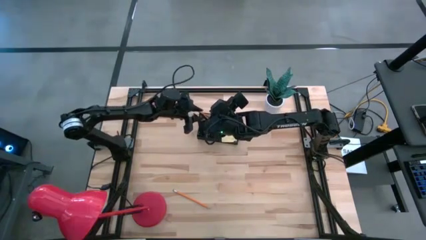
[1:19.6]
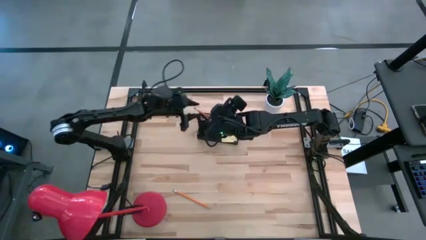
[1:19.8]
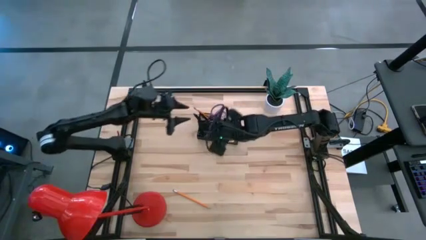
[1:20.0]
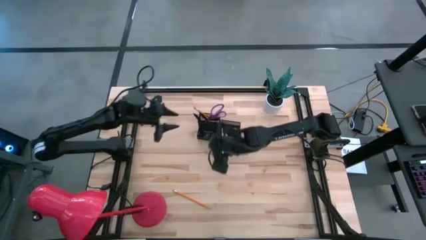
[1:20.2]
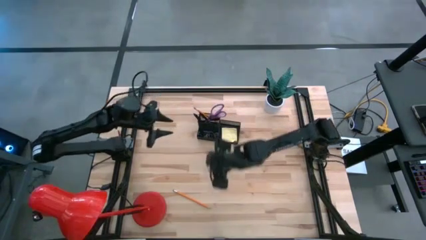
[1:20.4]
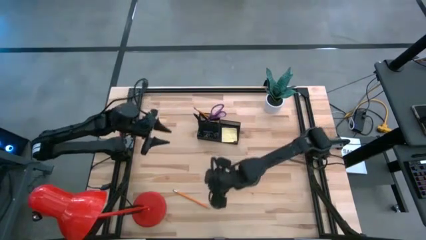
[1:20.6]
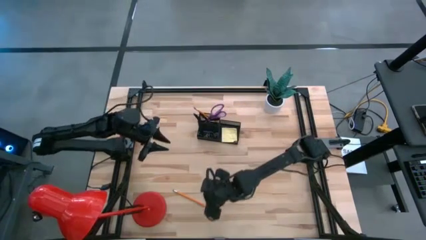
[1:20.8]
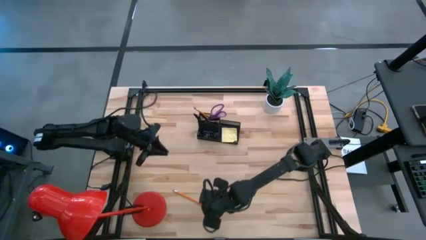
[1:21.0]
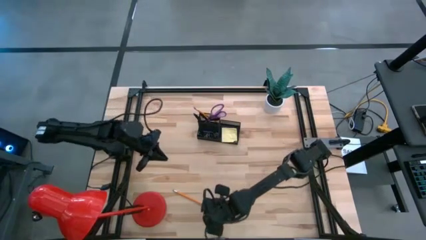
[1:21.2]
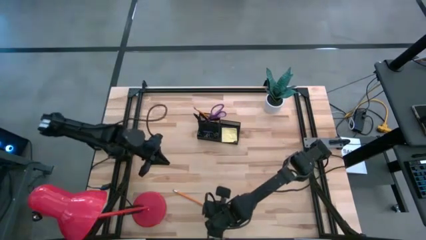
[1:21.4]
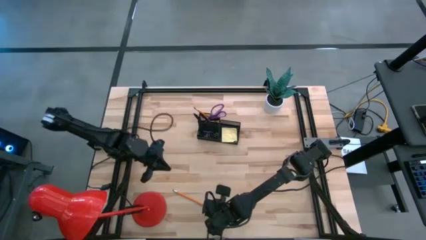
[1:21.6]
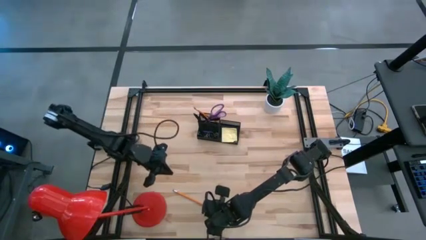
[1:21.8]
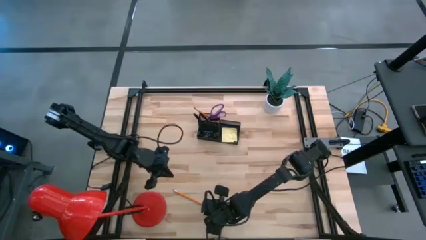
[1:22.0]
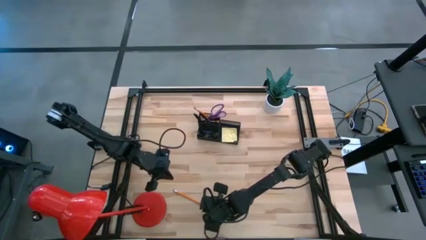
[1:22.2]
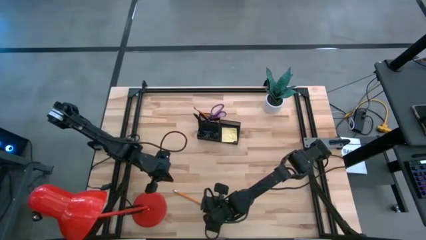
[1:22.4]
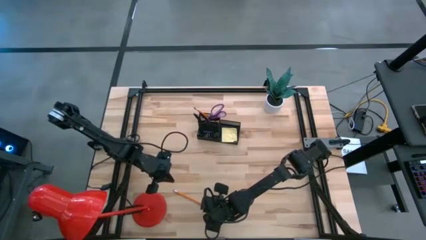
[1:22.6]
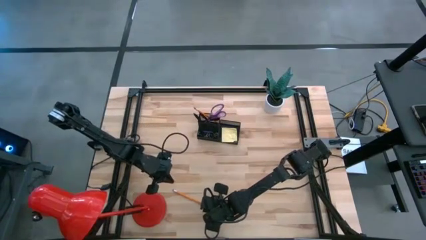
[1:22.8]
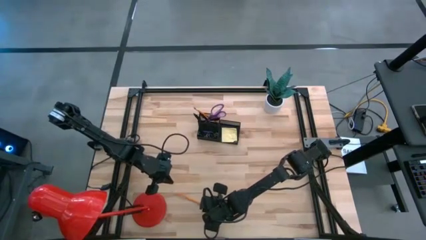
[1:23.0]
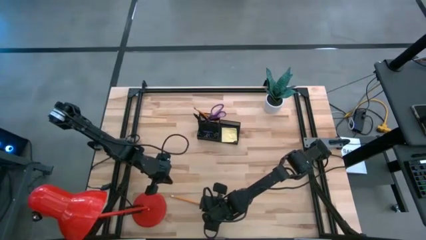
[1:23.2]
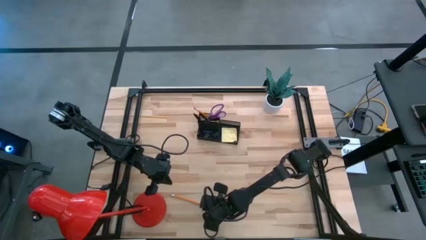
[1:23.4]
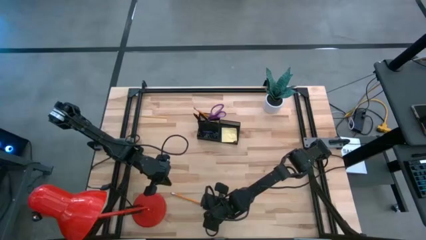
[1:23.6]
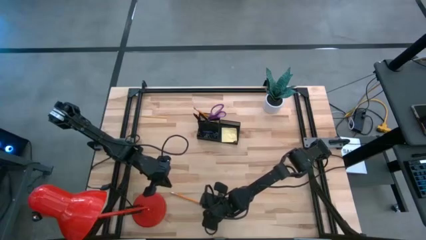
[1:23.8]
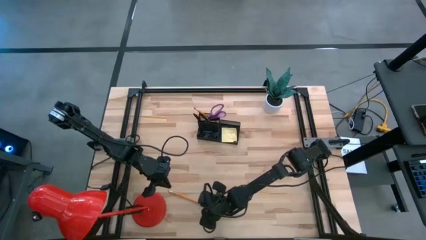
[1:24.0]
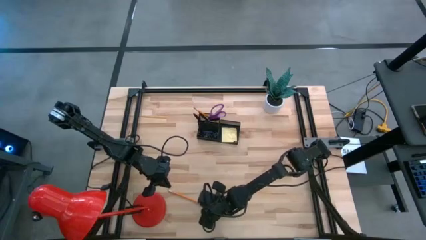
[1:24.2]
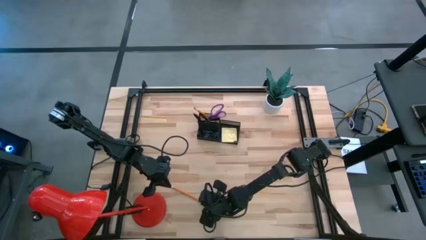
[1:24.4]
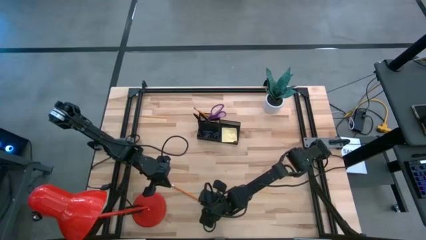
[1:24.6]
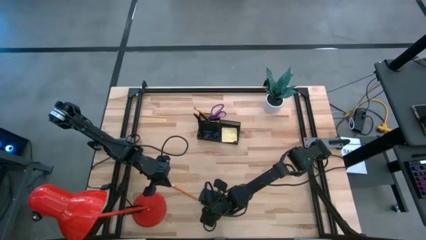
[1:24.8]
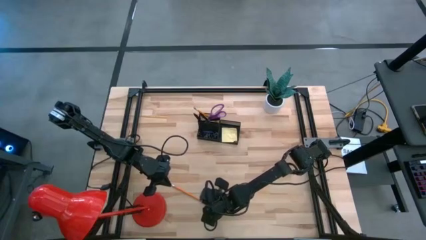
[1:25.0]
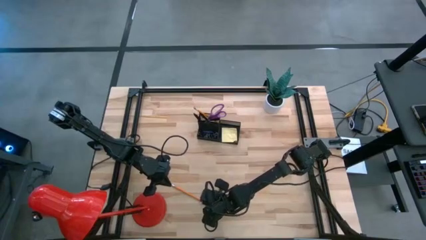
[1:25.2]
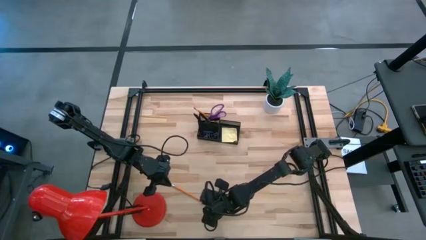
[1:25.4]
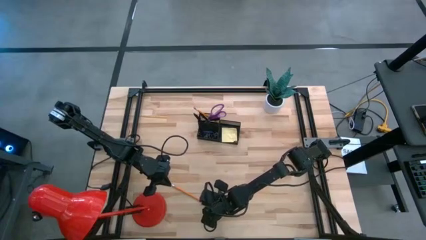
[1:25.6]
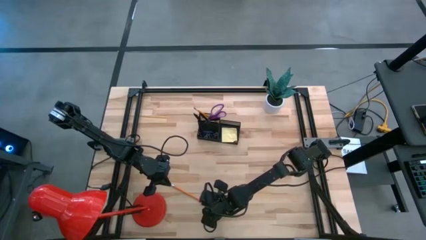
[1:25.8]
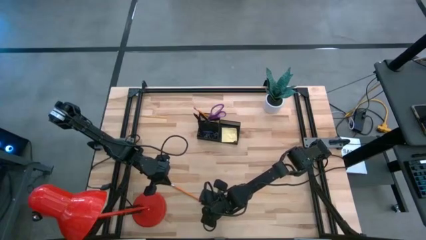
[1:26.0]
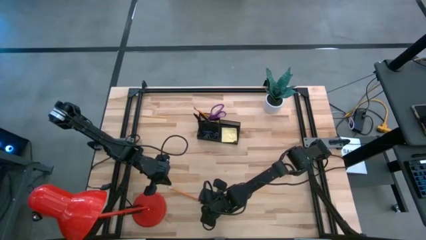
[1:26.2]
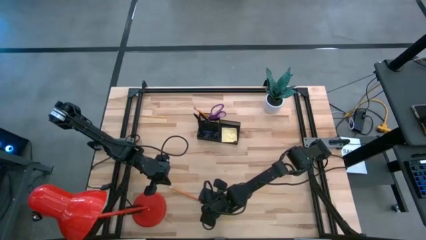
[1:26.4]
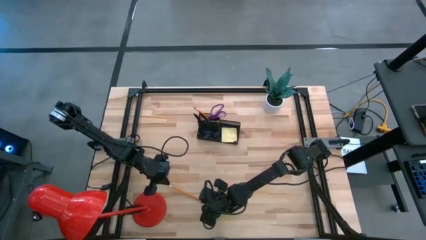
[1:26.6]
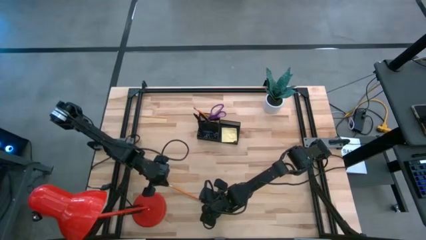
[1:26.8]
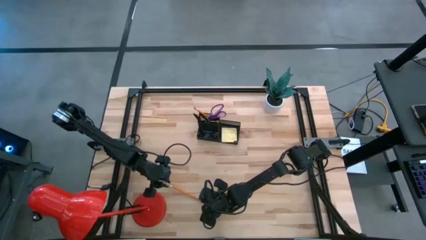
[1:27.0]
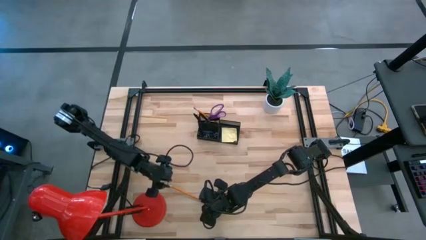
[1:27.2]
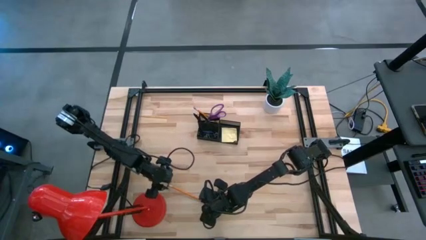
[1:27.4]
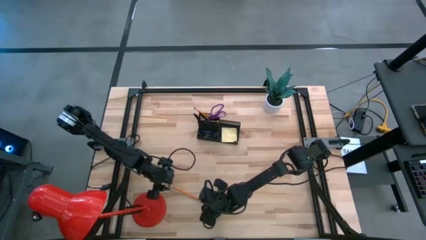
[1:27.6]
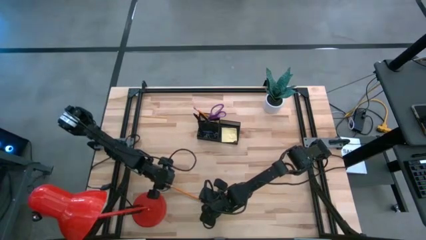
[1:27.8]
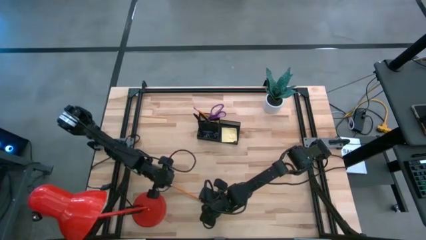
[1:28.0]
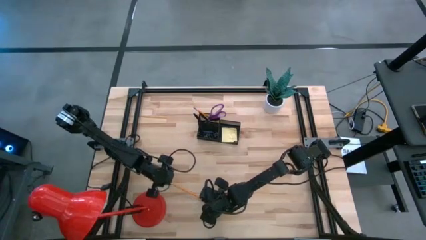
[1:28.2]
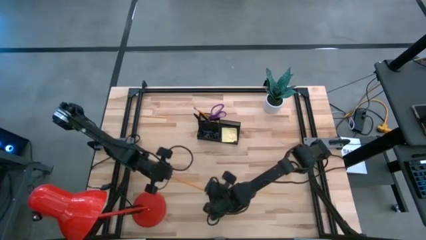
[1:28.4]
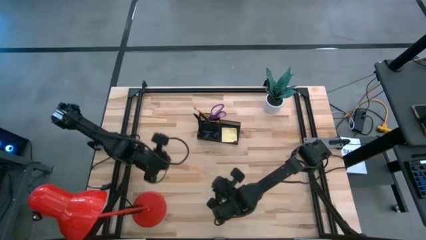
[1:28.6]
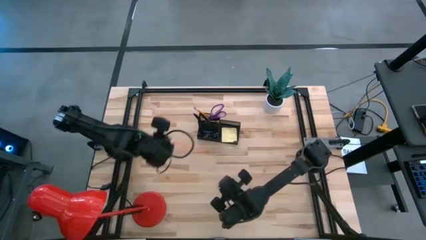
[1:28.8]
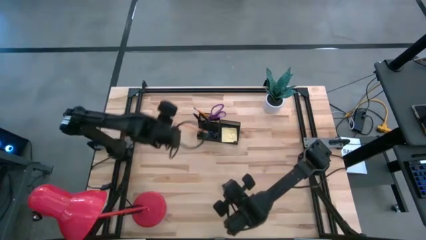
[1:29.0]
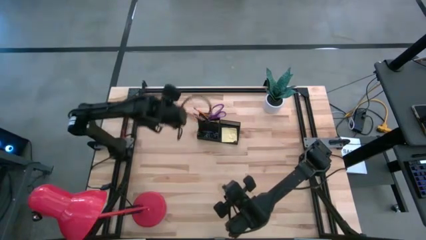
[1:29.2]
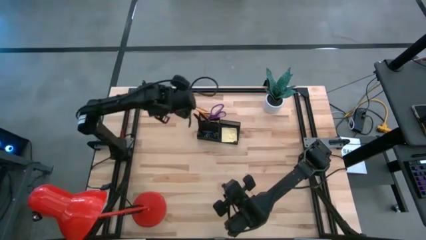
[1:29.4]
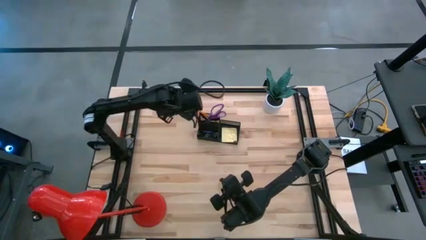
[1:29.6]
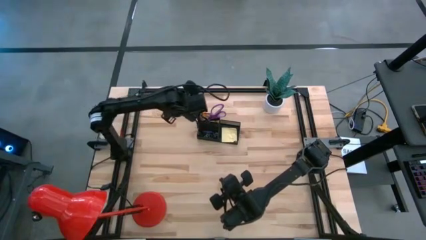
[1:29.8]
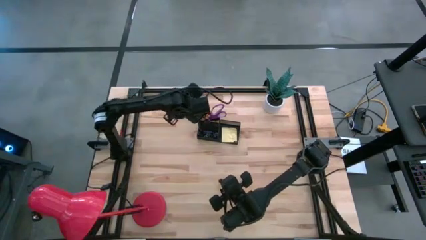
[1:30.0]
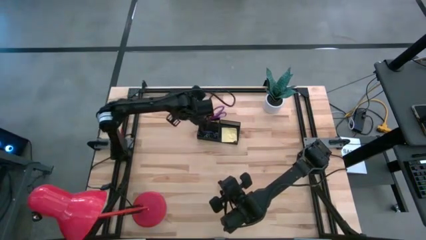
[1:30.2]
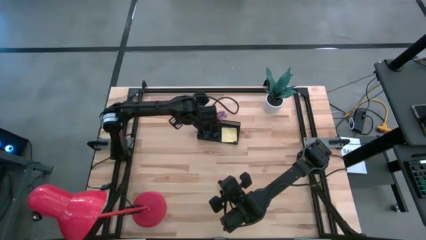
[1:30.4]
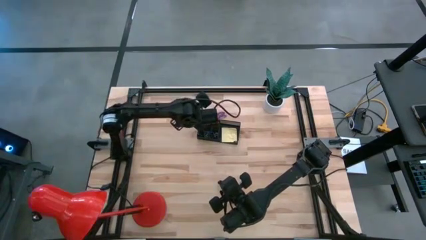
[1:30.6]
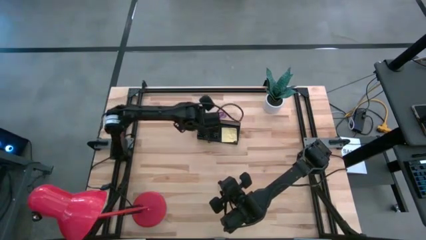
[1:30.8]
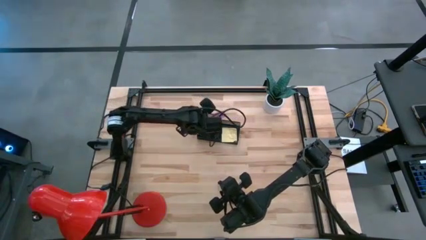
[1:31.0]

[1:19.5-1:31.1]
Task: Pick and place office supplies into organizer
Put the pencil into the desk organizer

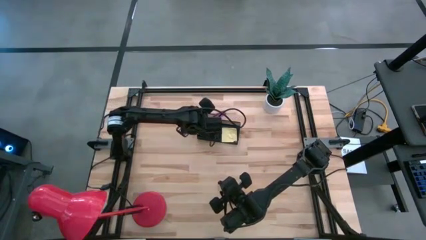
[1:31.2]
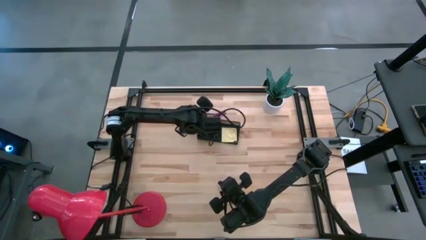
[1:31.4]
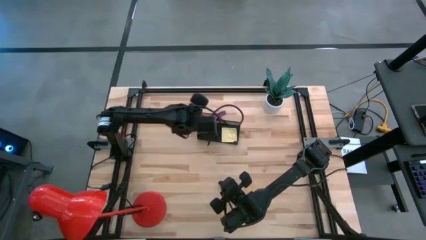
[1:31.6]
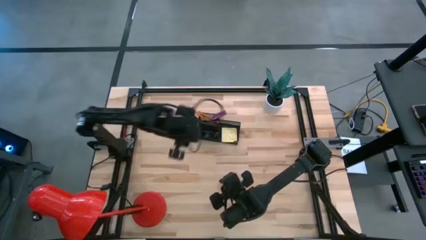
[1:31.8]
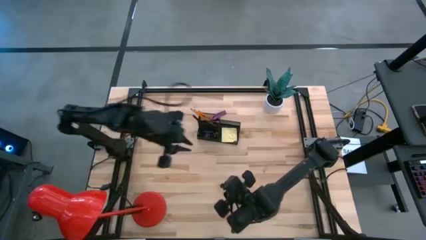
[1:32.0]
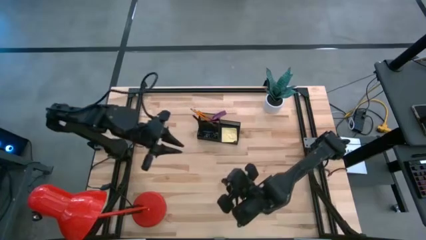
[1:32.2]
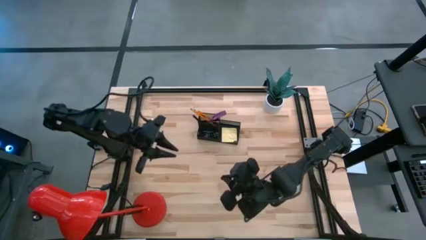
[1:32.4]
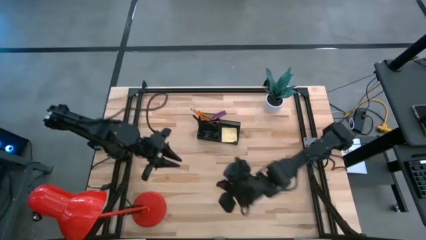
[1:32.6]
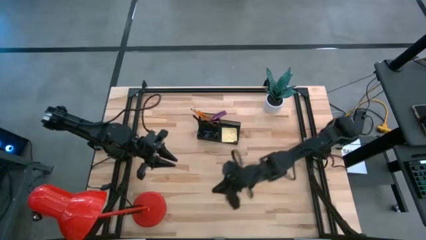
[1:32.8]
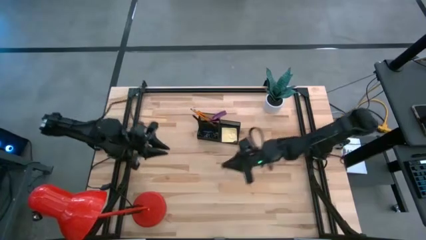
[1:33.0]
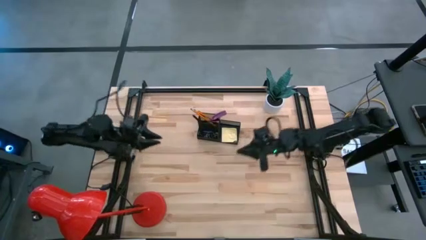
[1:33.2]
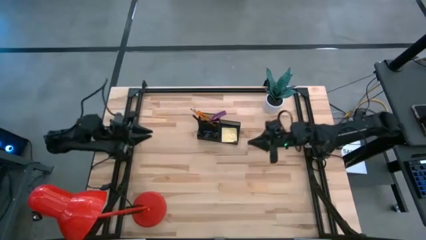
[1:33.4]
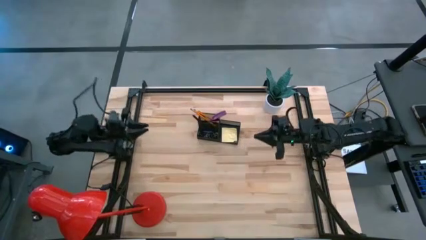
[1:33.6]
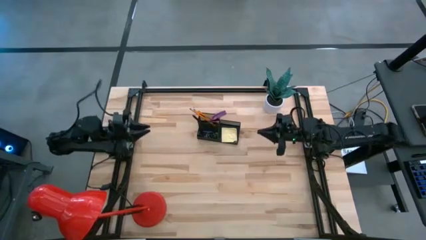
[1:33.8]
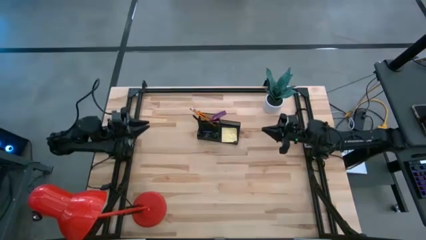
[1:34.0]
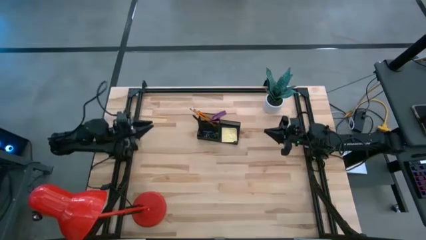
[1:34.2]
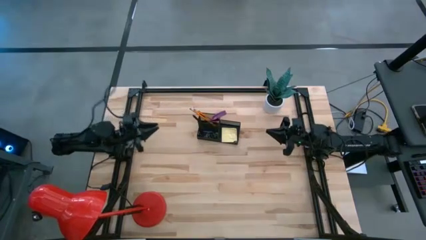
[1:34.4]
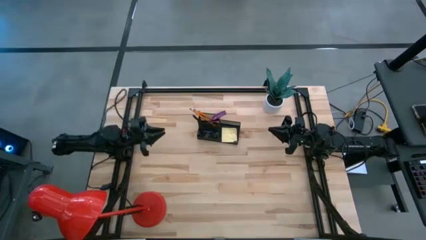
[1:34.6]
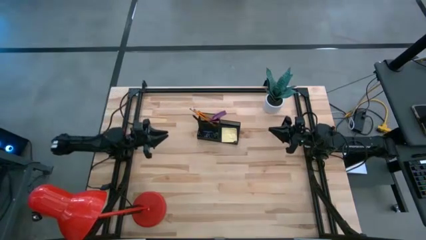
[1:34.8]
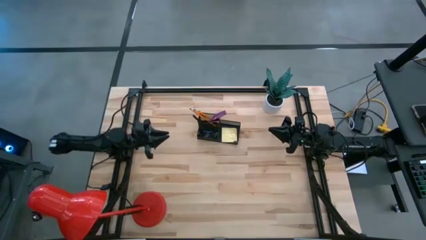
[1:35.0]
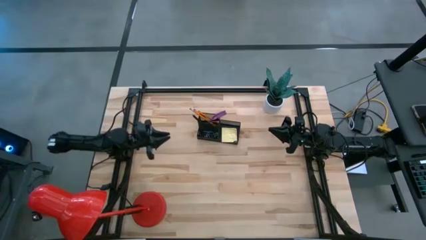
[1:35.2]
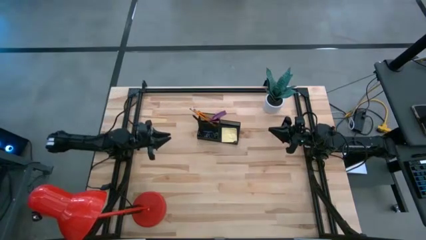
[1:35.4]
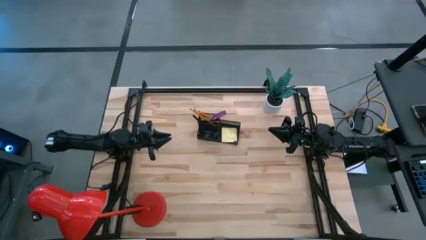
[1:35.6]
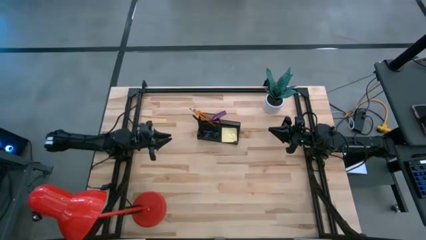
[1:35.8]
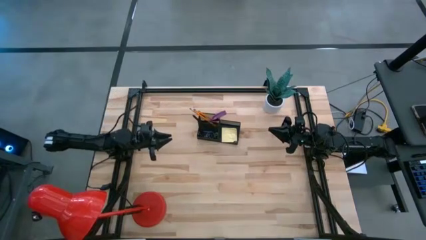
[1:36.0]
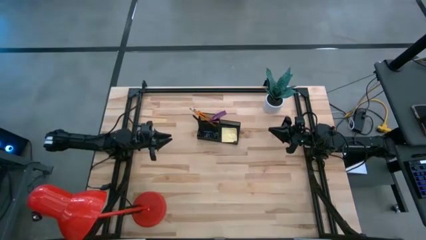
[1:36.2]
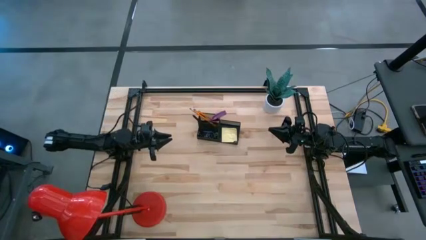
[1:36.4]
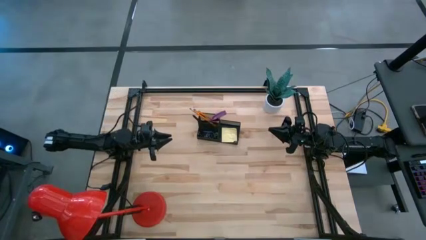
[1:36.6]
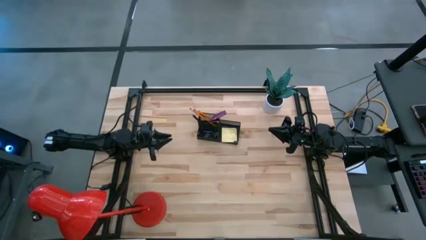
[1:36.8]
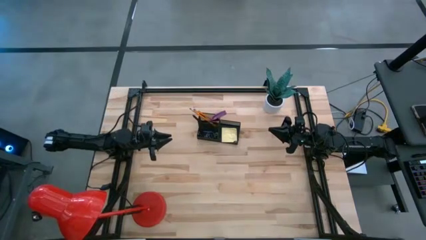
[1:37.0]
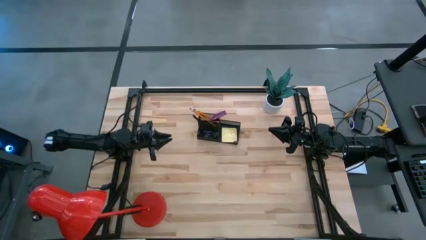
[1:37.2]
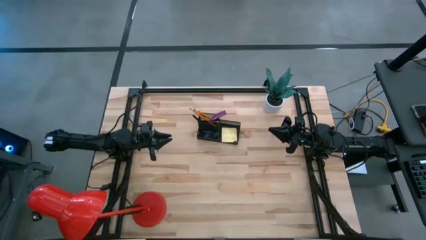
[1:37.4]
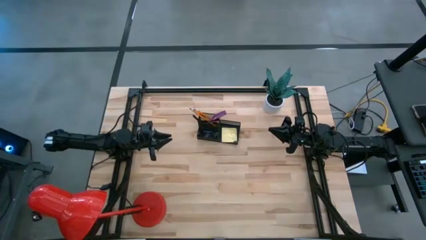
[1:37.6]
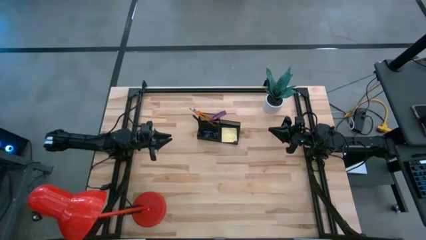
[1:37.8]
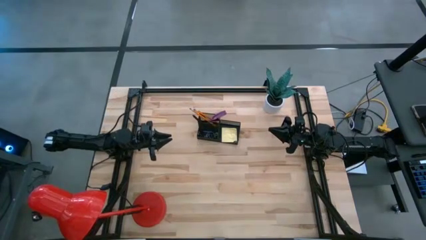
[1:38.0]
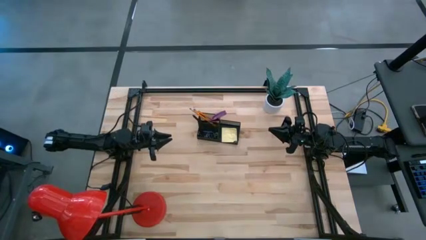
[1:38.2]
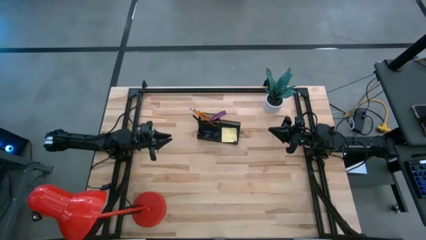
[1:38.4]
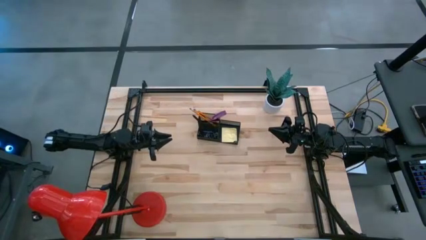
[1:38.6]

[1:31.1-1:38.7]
Return to Home Position
